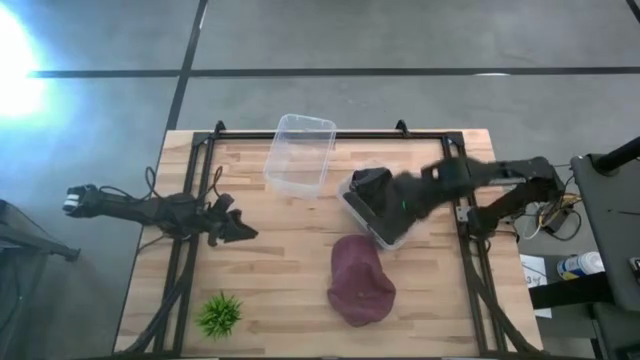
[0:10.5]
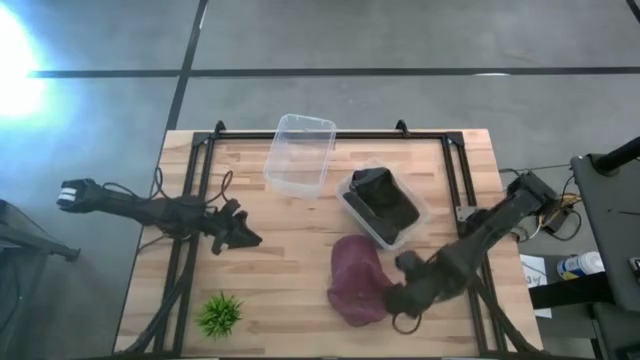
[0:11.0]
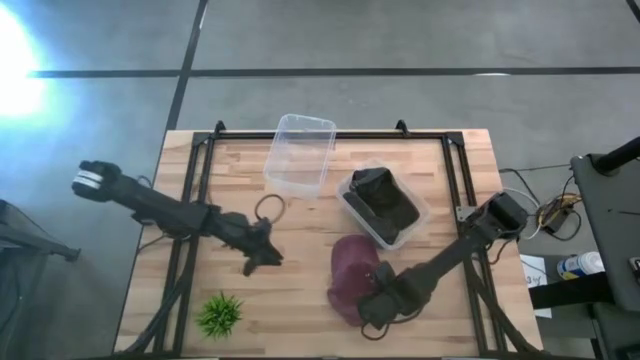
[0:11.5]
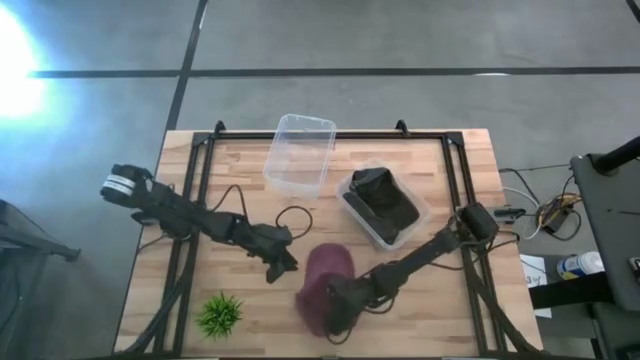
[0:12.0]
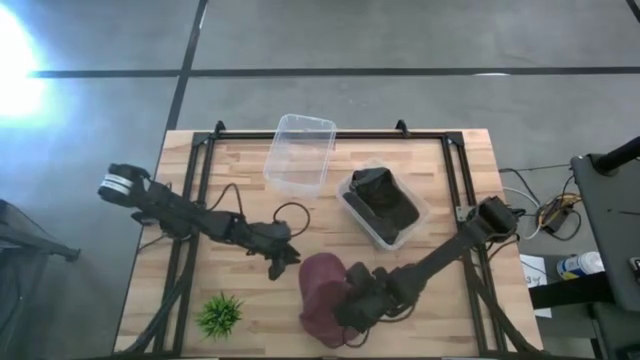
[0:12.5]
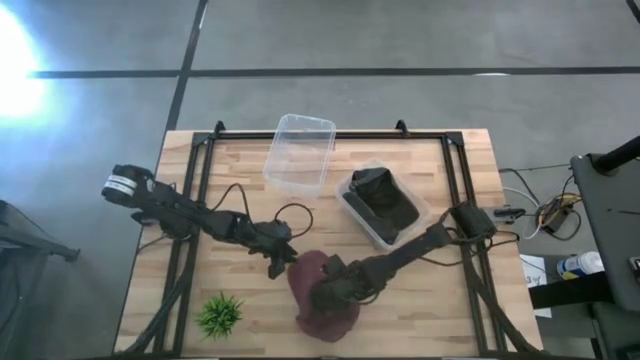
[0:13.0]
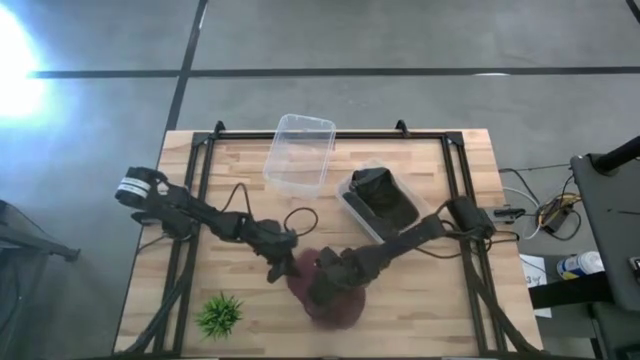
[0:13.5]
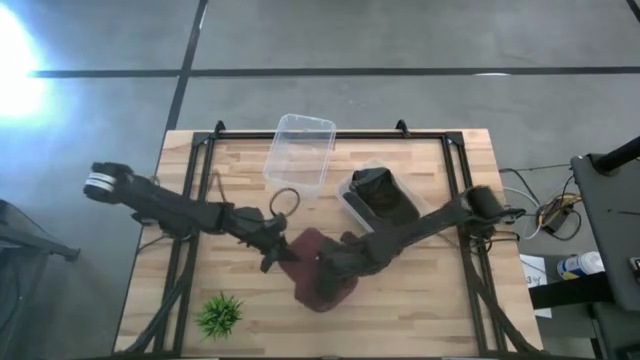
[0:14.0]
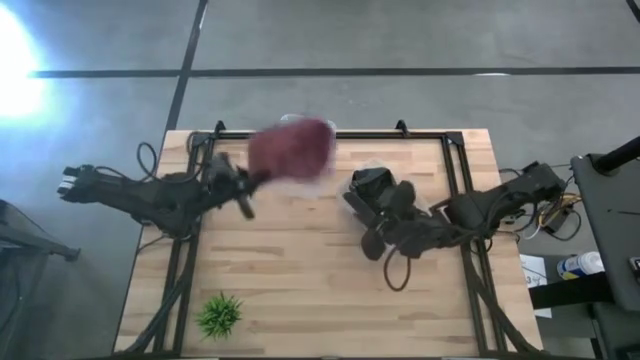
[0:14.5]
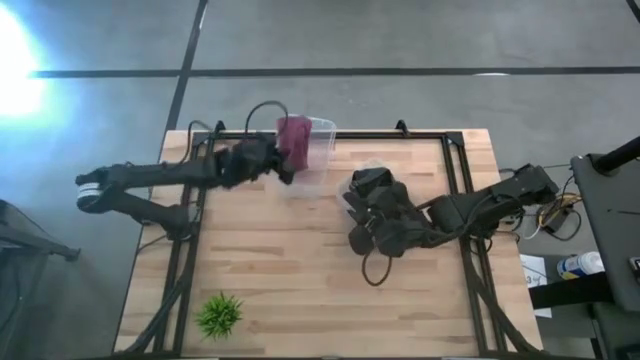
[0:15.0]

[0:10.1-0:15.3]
Task: Pick & Place hat
Put the red cap into the left transparent bin

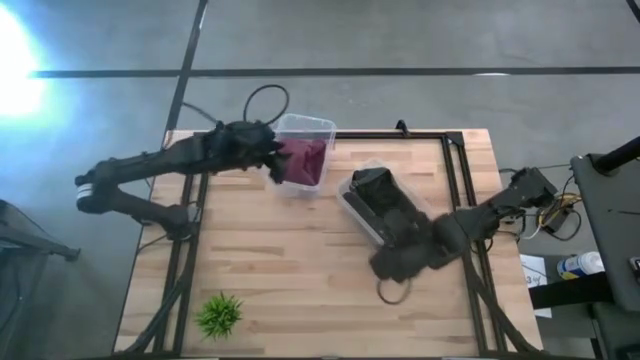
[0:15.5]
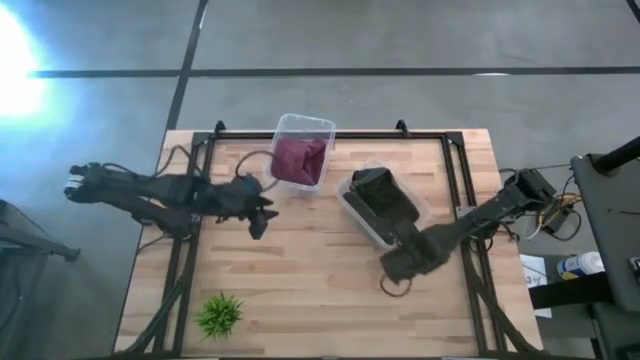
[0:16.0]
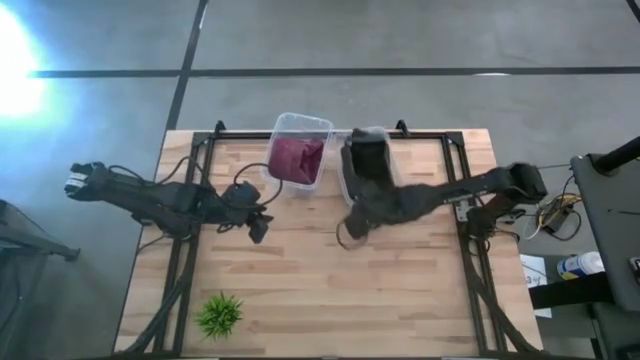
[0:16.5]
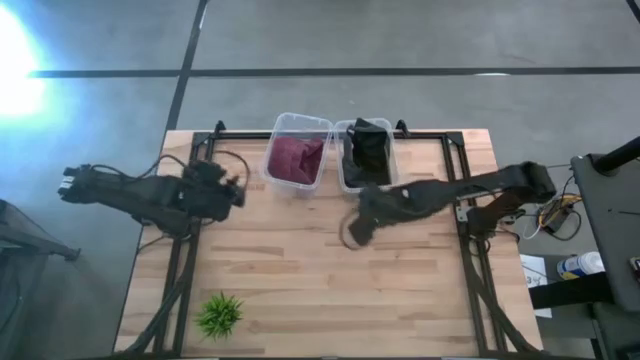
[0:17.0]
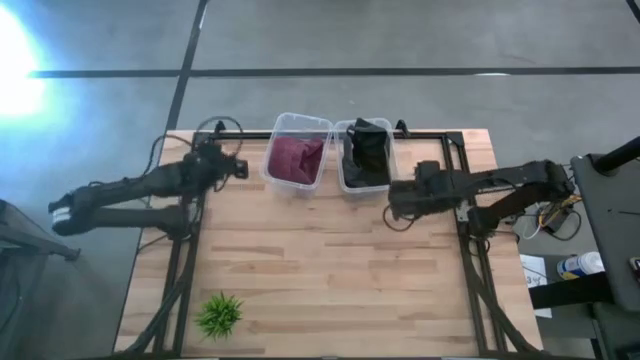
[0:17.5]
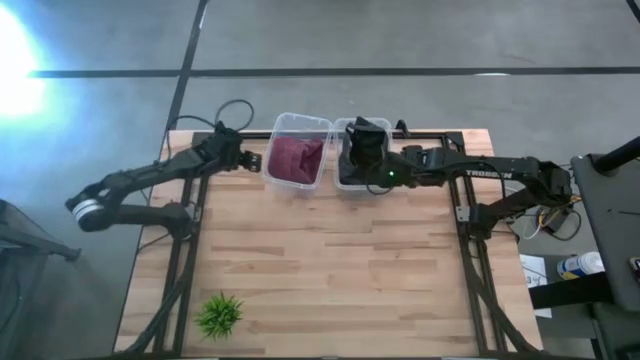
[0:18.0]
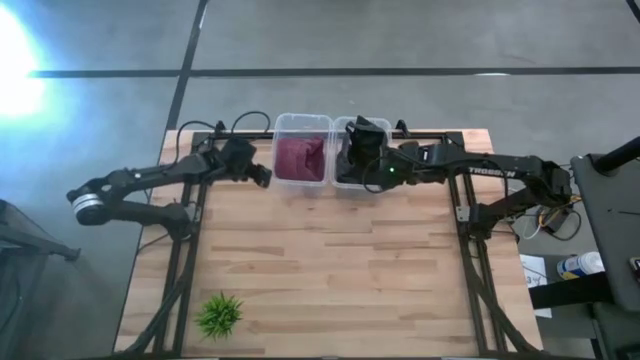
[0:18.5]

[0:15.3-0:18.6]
Adjust the transparent bins

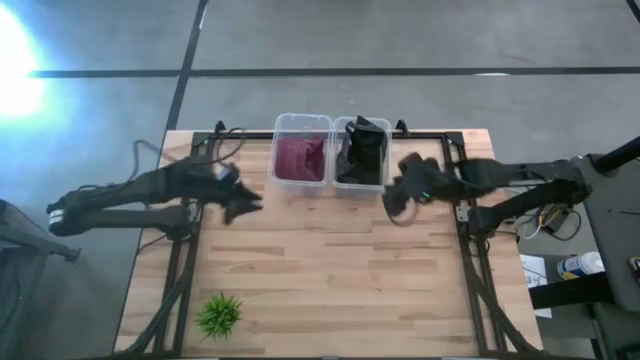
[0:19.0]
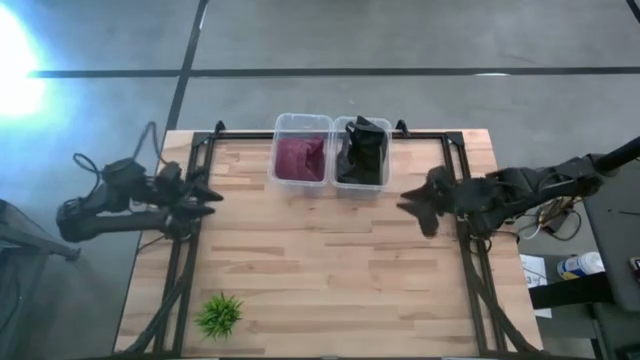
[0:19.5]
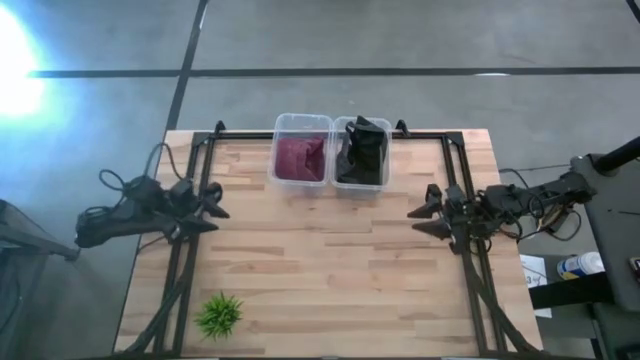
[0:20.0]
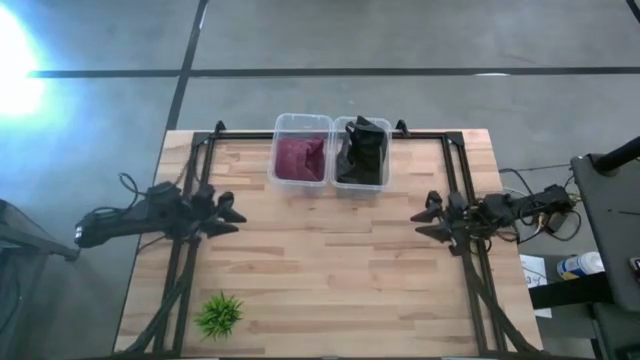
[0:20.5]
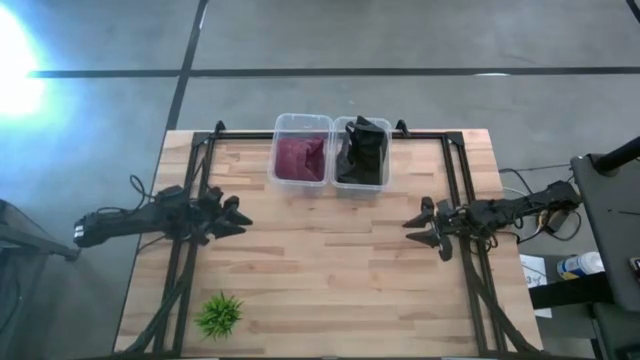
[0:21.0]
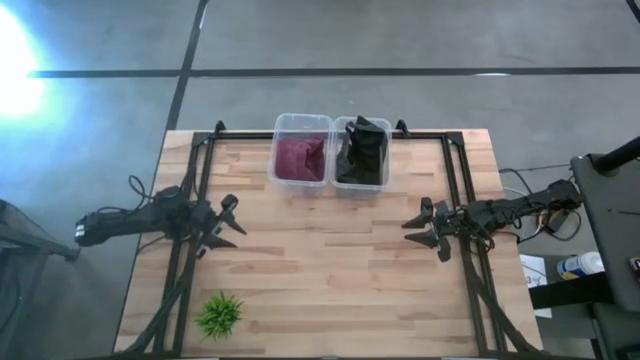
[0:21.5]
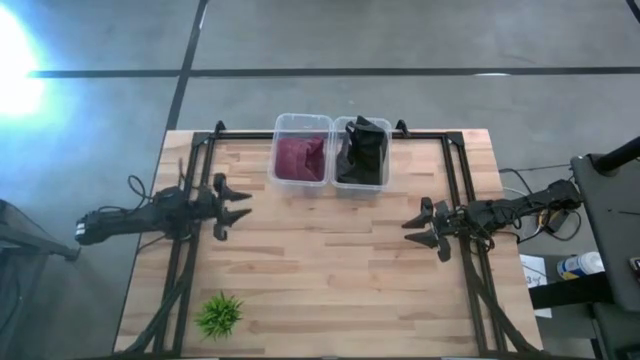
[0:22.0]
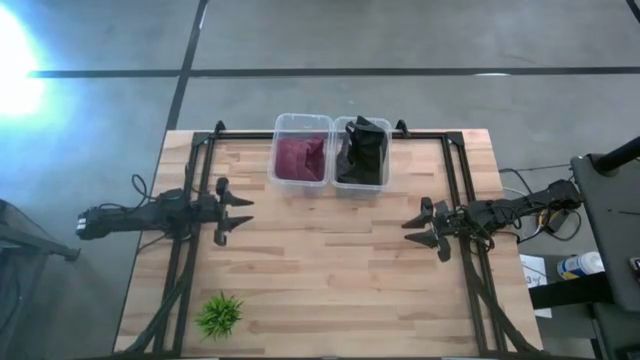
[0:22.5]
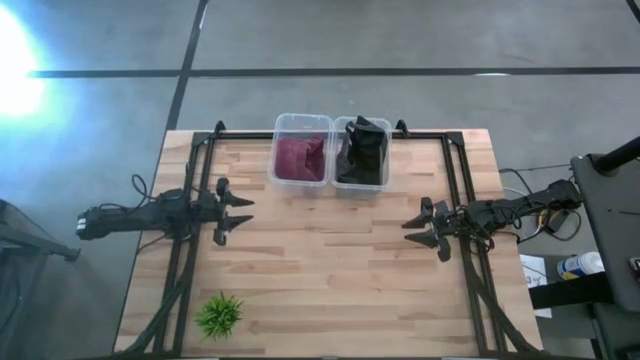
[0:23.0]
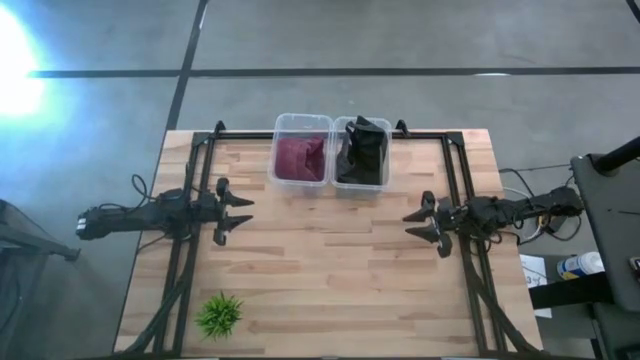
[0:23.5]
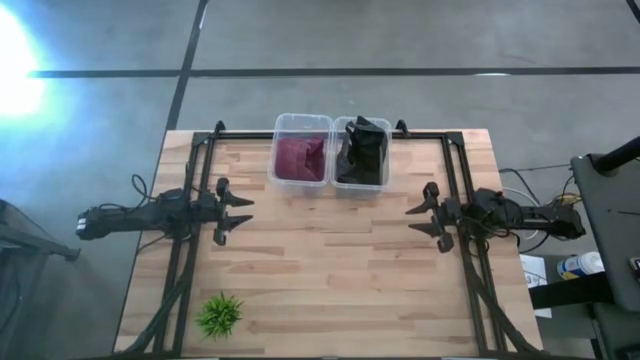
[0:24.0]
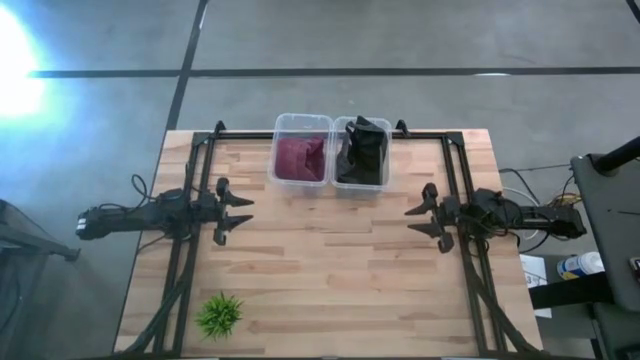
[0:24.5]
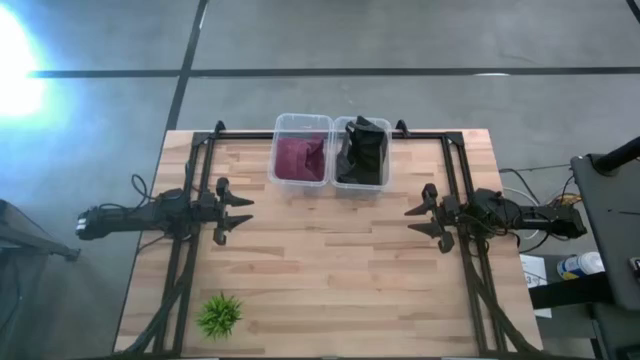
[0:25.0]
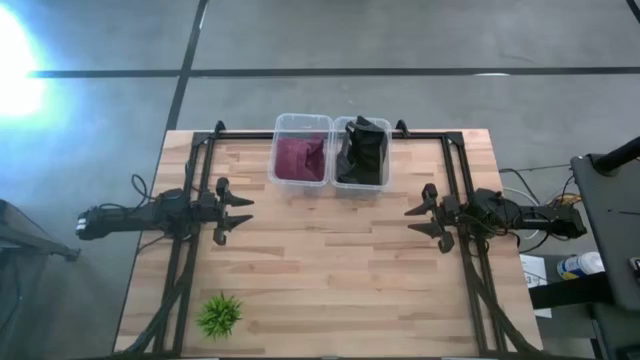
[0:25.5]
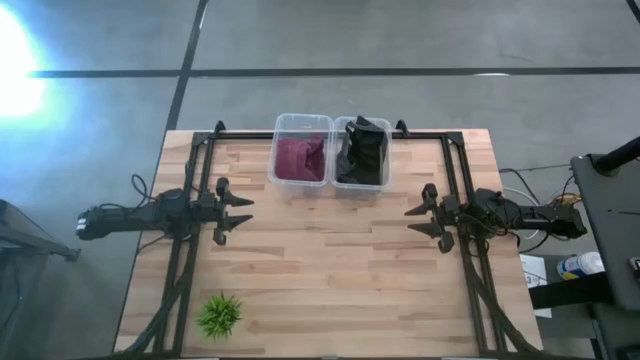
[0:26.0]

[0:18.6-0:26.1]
Return to Home Position

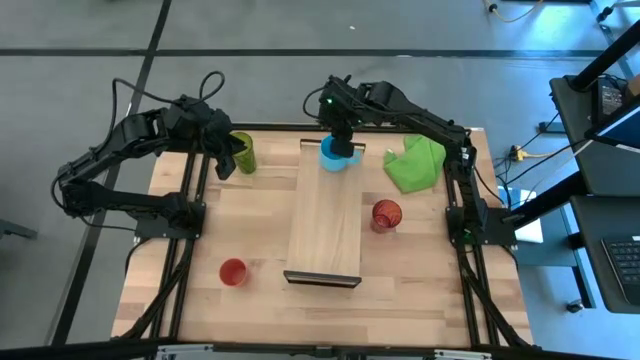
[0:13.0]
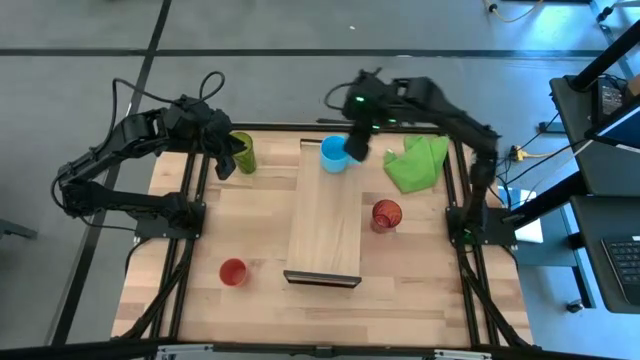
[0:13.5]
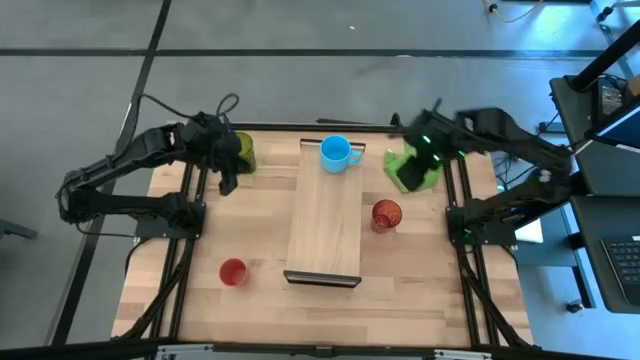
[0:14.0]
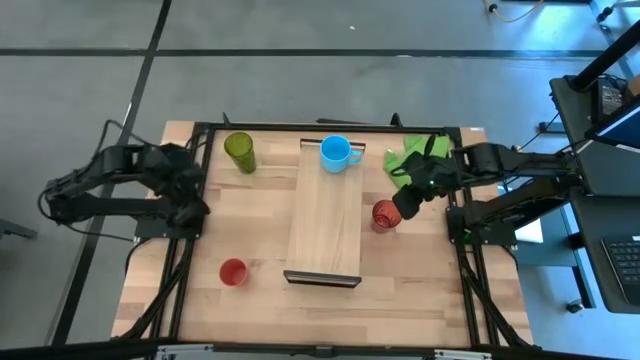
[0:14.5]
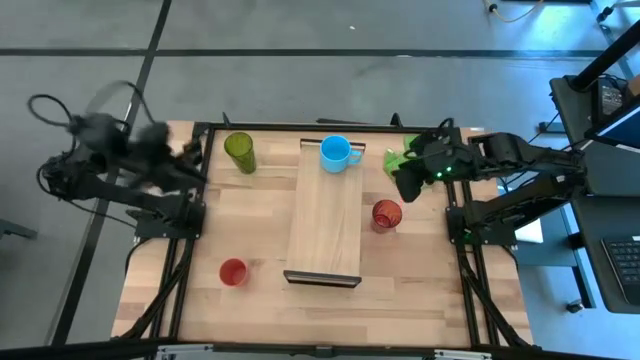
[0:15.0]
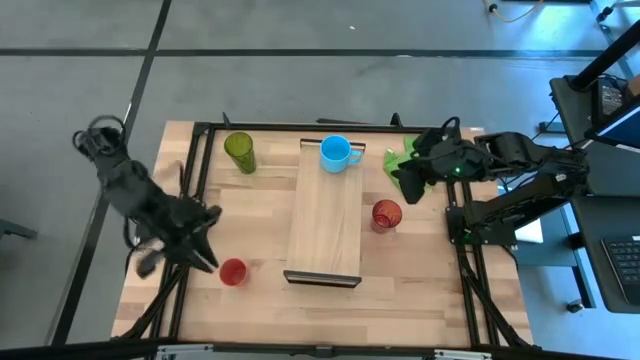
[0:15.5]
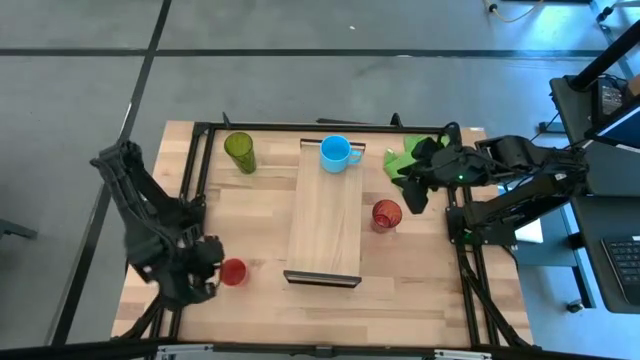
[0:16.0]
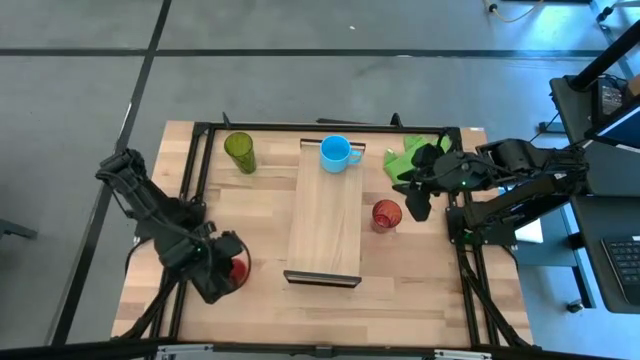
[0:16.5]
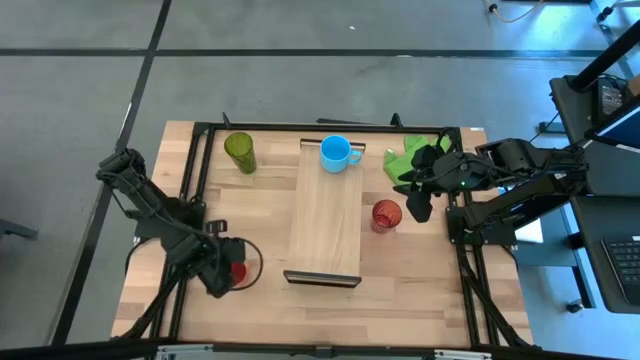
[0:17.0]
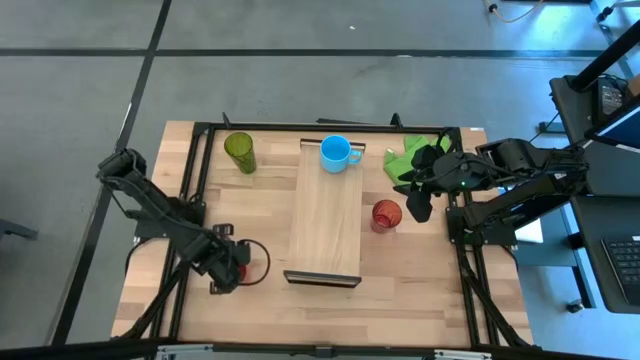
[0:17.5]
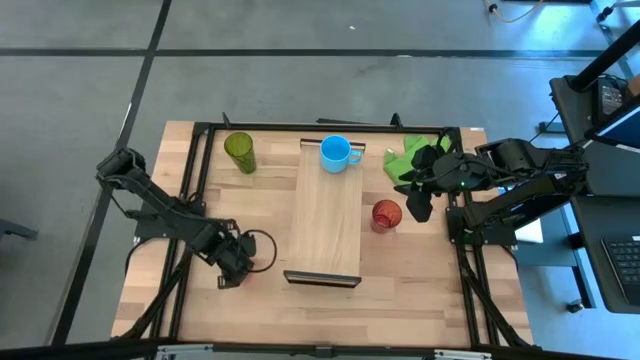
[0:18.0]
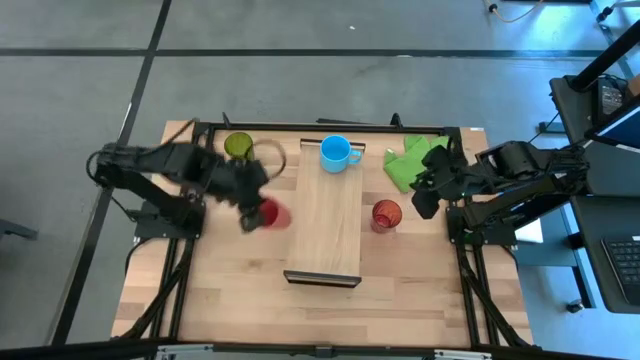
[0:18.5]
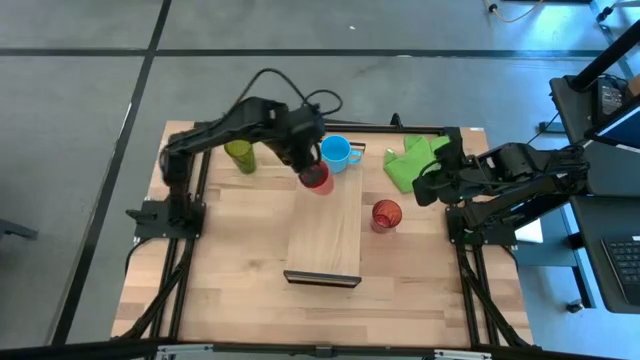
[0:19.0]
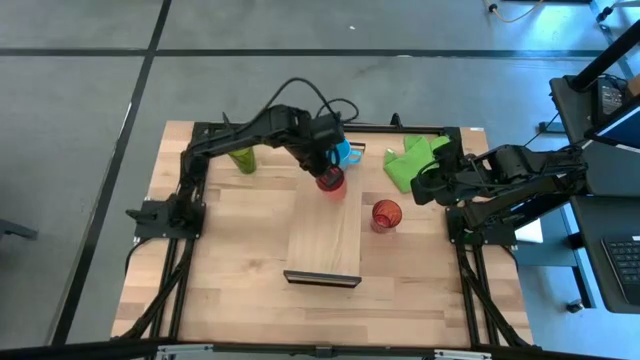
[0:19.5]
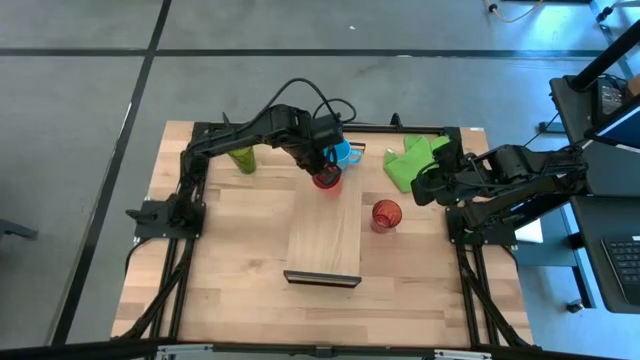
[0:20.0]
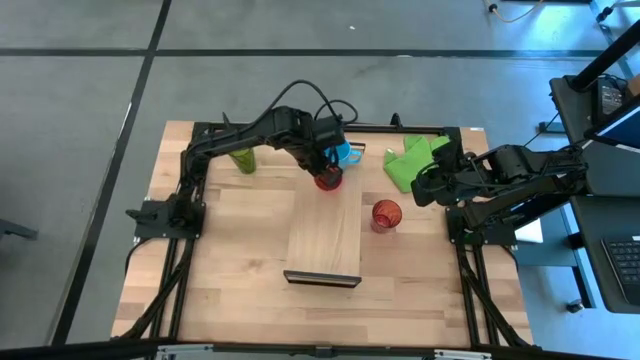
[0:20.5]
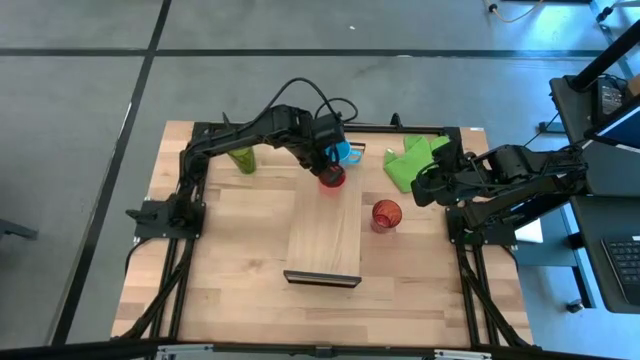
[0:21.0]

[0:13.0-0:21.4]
Task: Stack small to large cups/mugs on shelf
Put the orange cup on the shelf
